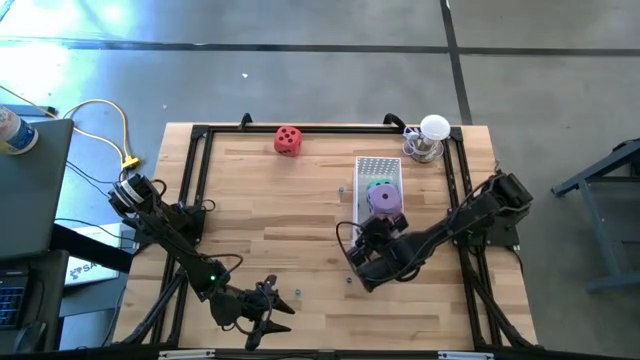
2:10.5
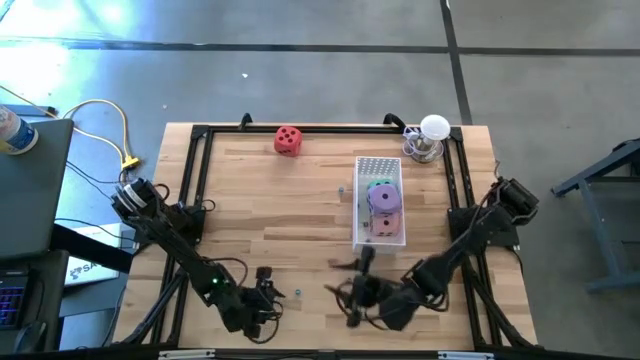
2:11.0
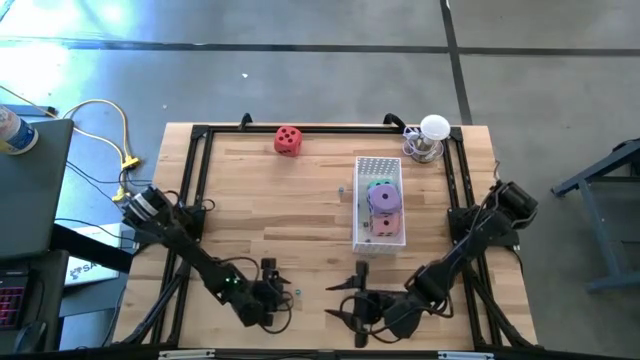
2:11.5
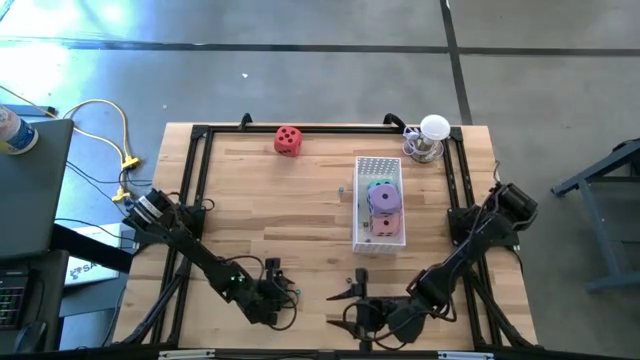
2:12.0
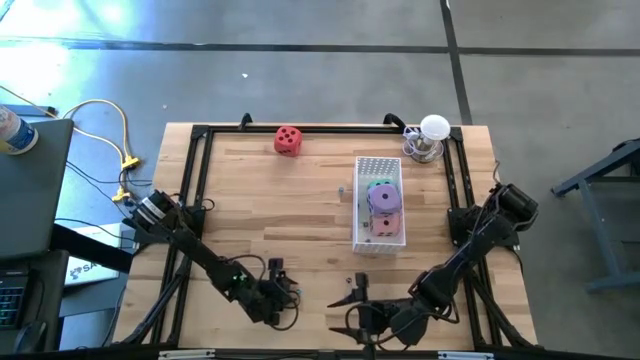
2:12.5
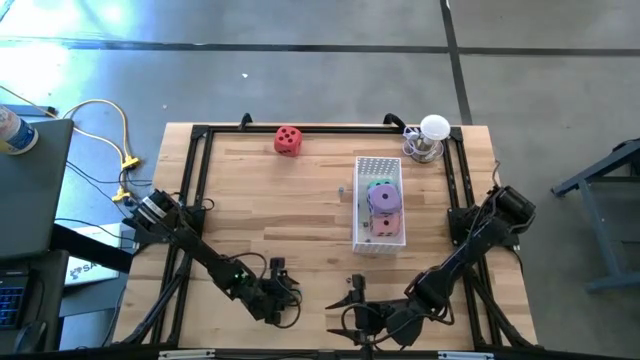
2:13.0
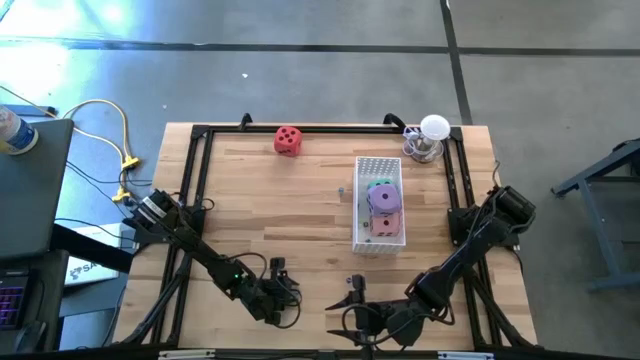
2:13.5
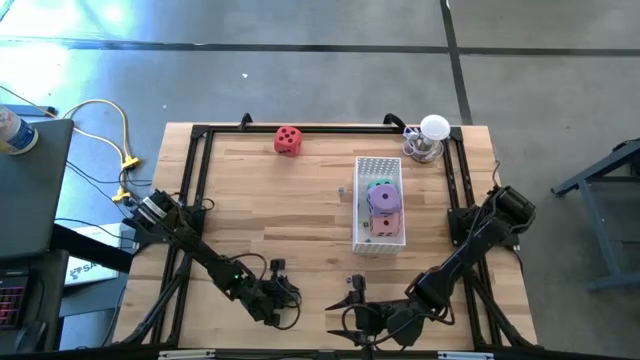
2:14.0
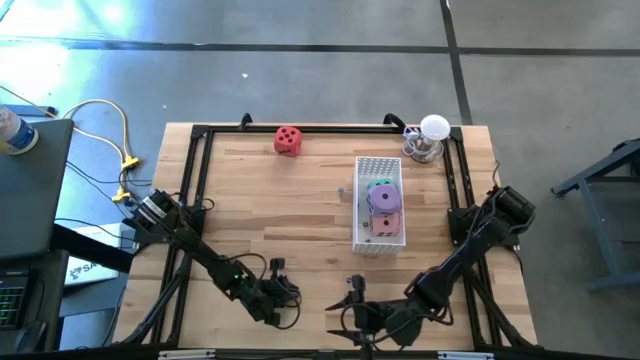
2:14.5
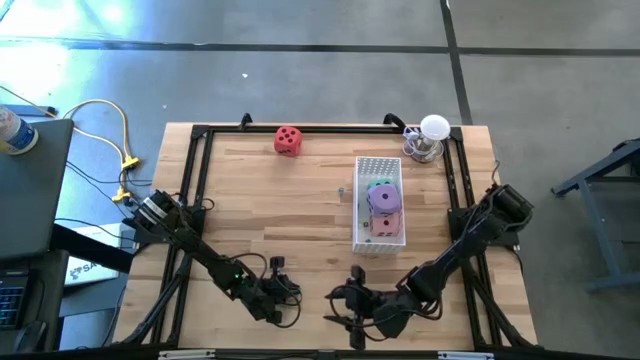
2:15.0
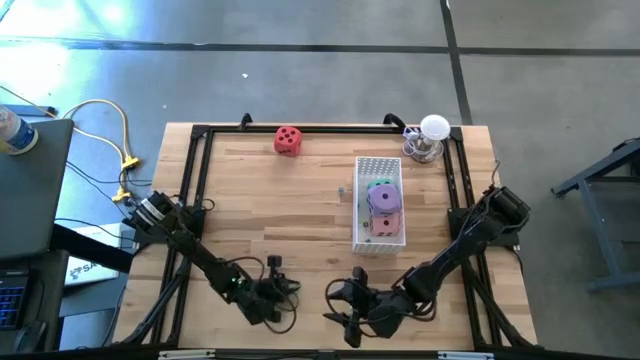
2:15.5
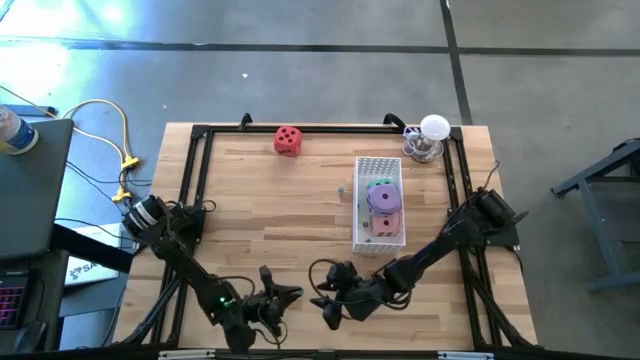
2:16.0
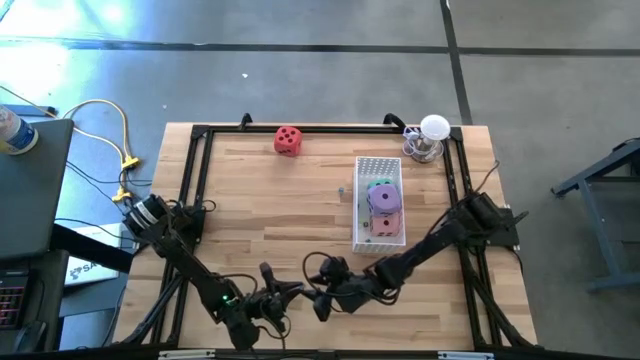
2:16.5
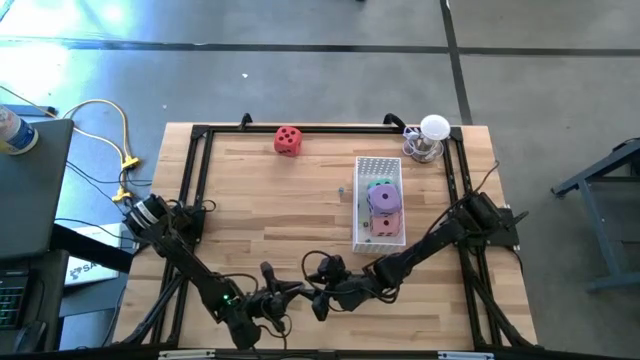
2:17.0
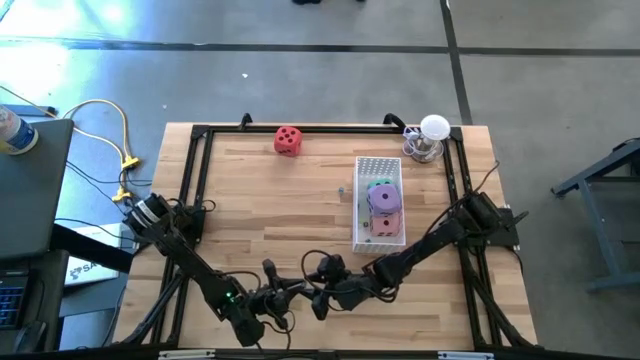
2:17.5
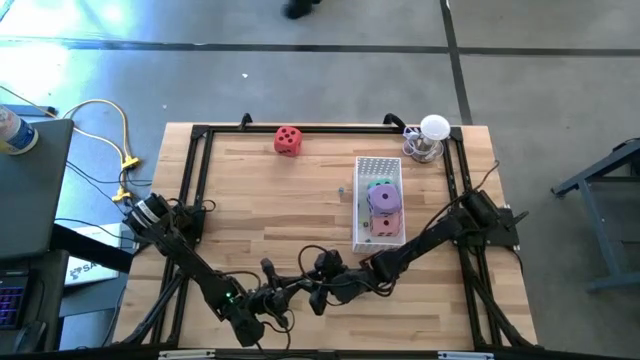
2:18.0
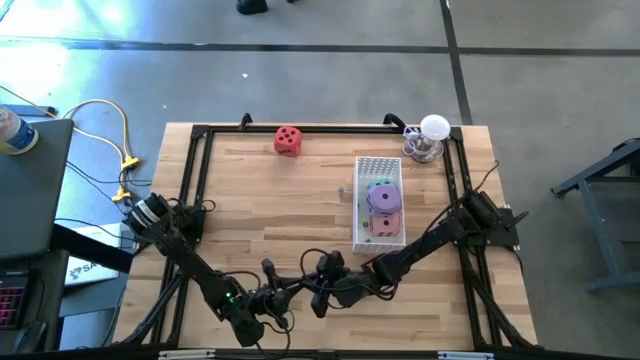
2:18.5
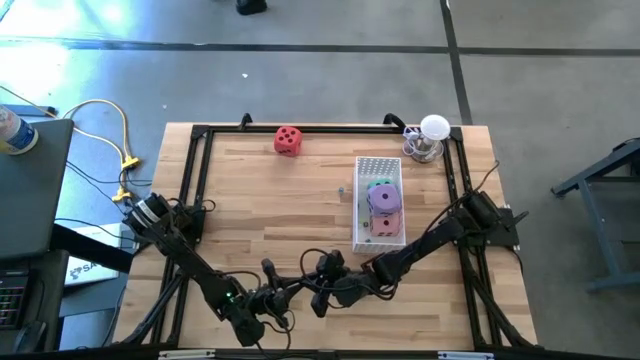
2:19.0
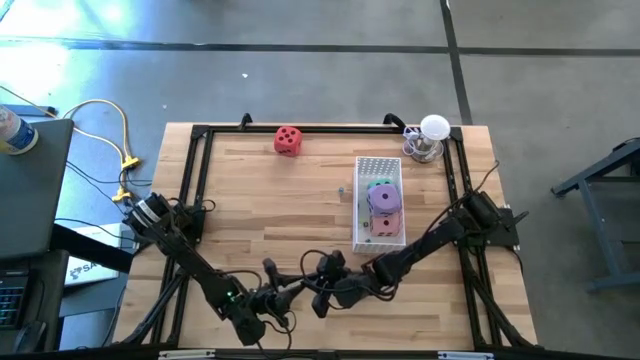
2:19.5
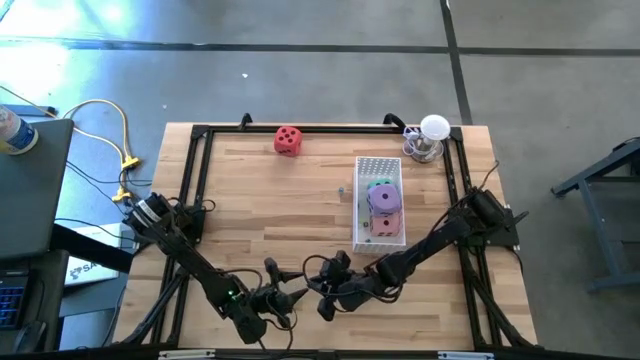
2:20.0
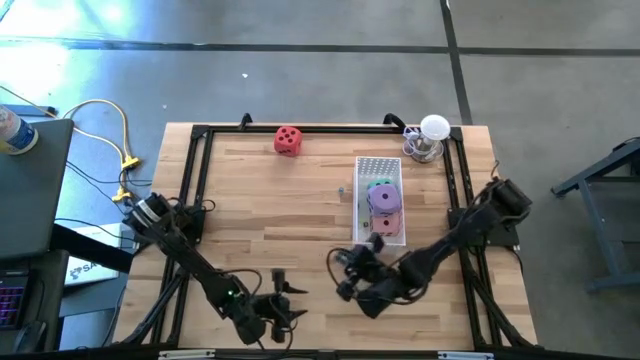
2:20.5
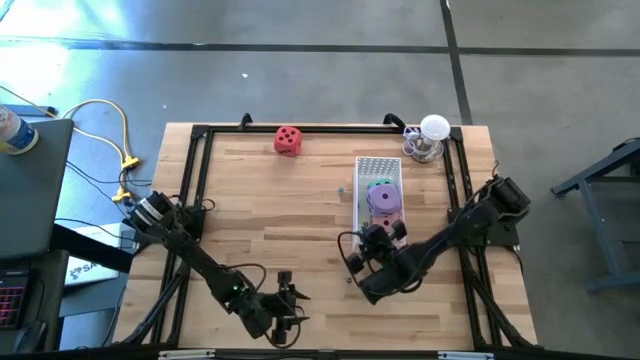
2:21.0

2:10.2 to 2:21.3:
Task: Pick & Place Dice
Put the light blue die into the white bin

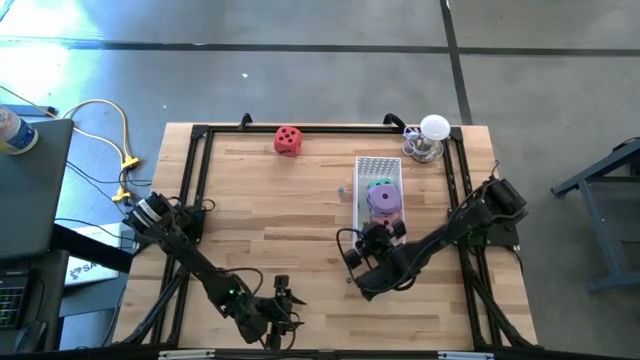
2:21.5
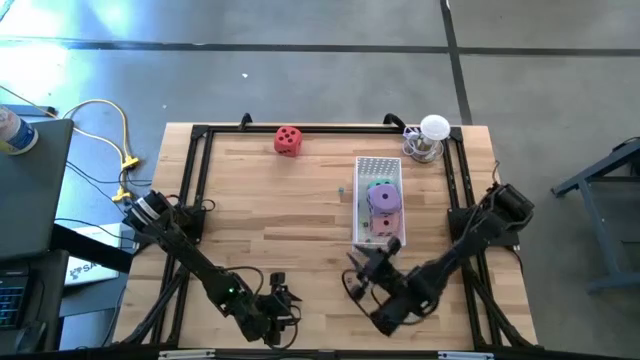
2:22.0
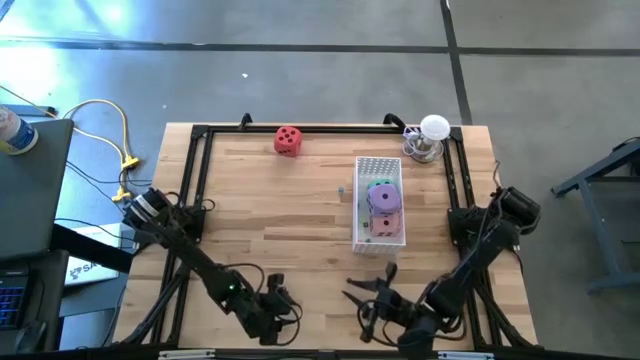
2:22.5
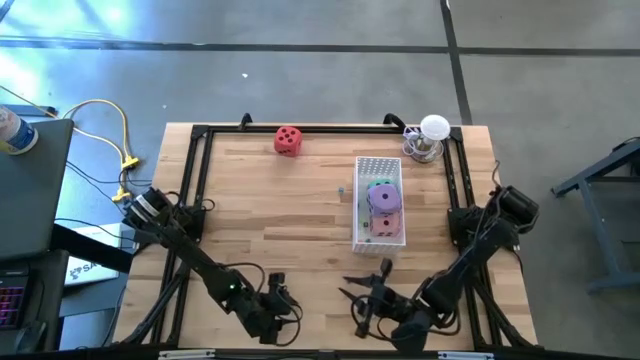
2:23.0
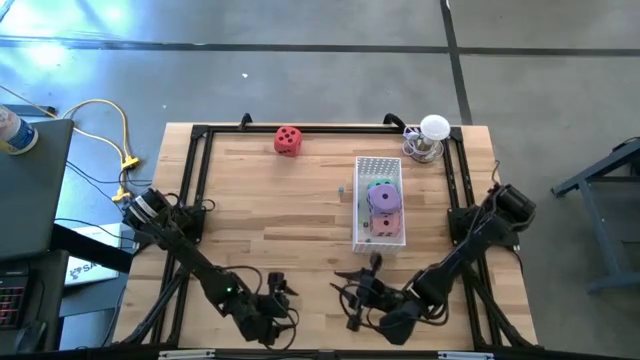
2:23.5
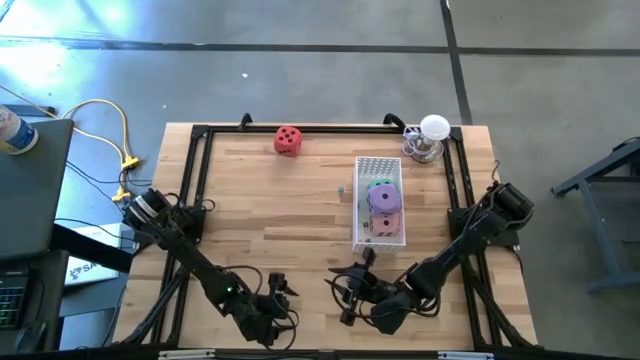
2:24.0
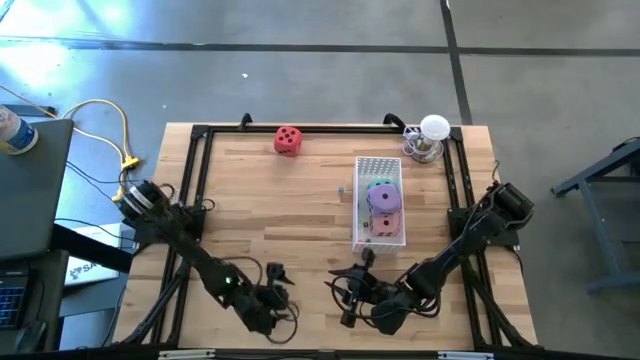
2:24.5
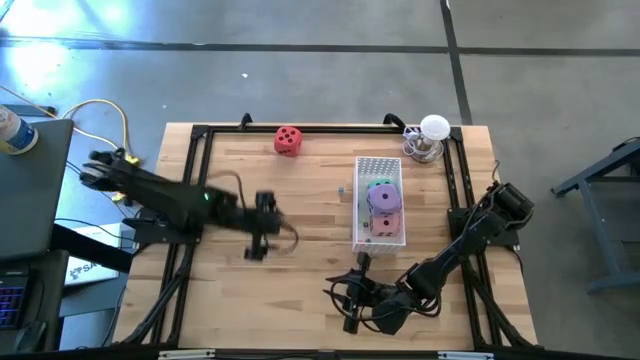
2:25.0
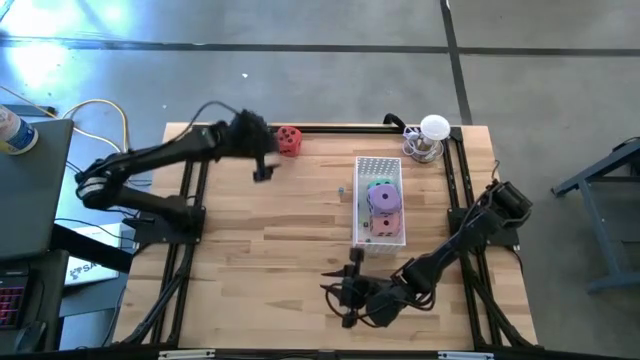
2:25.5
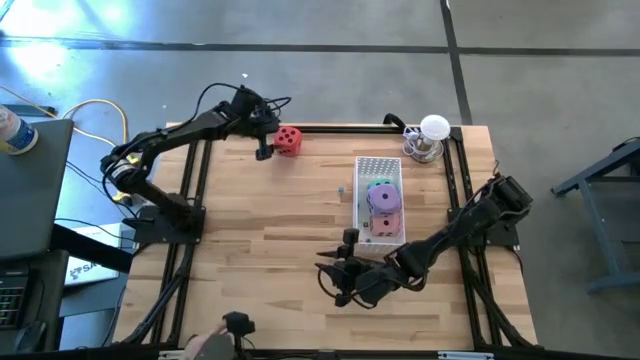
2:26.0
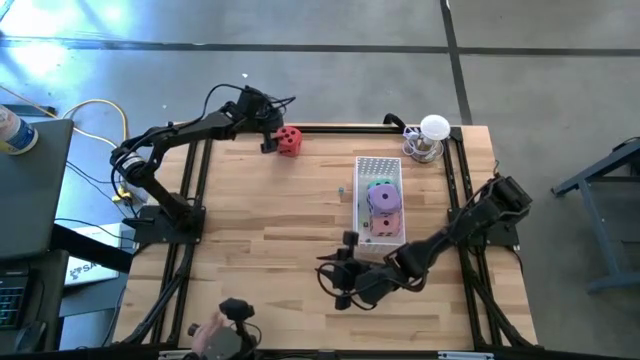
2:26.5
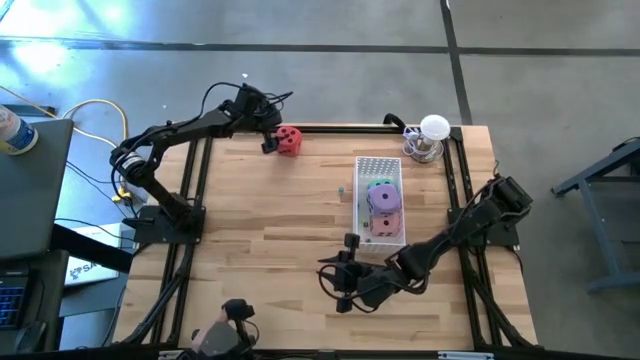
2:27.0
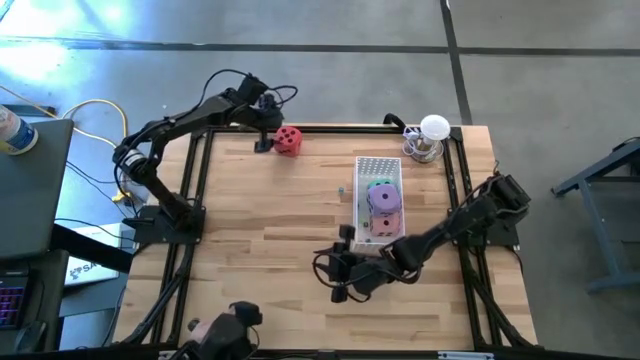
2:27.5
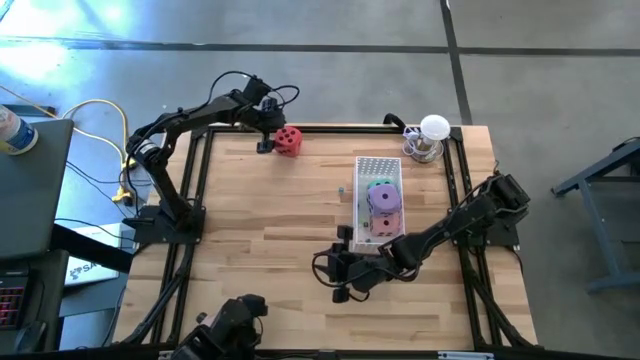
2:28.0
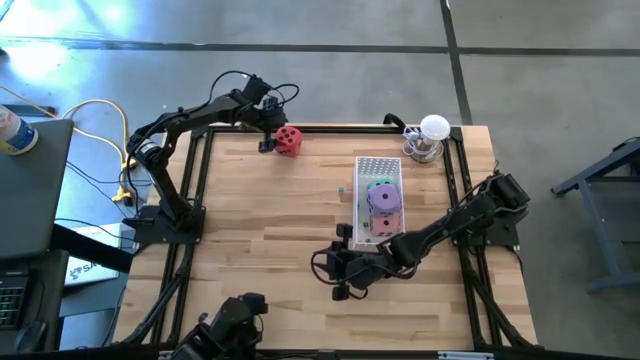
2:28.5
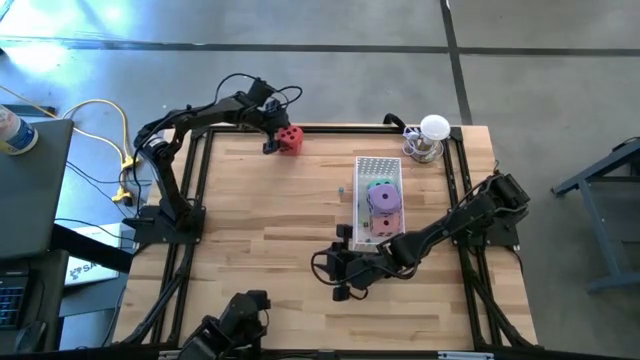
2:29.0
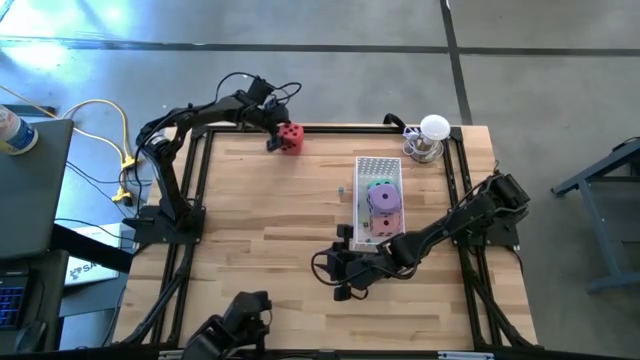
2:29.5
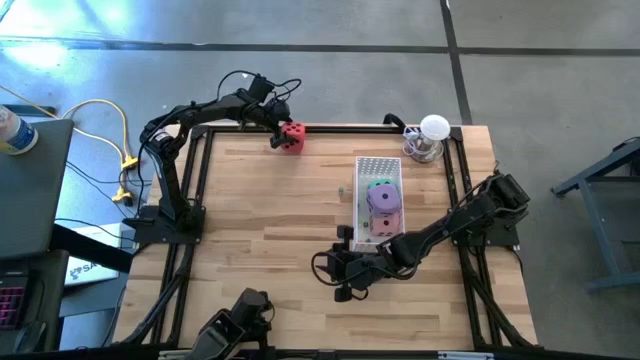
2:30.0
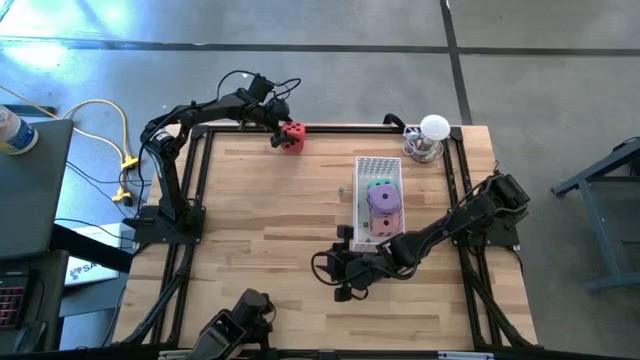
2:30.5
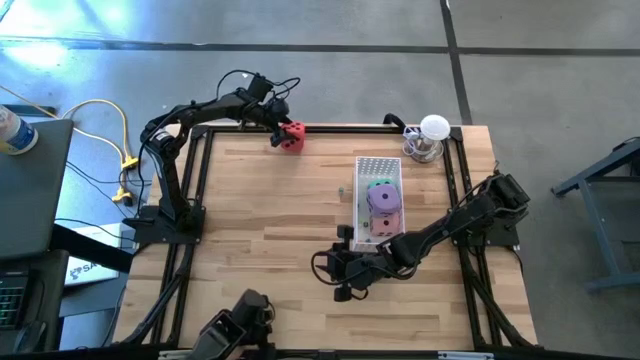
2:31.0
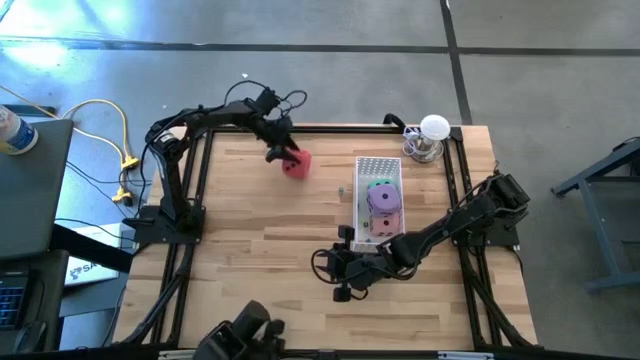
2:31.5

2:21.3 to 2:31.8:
Put the red die into the white bin
